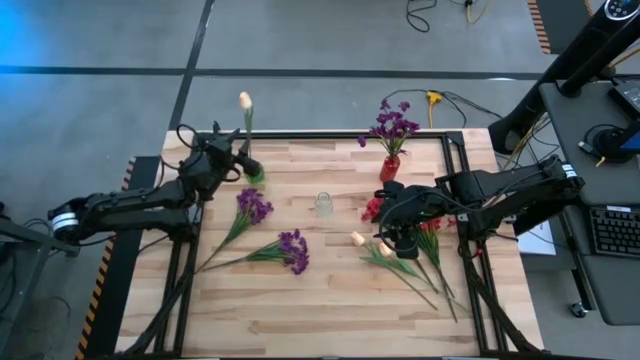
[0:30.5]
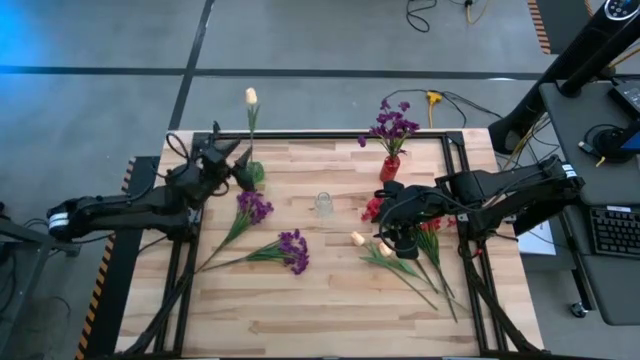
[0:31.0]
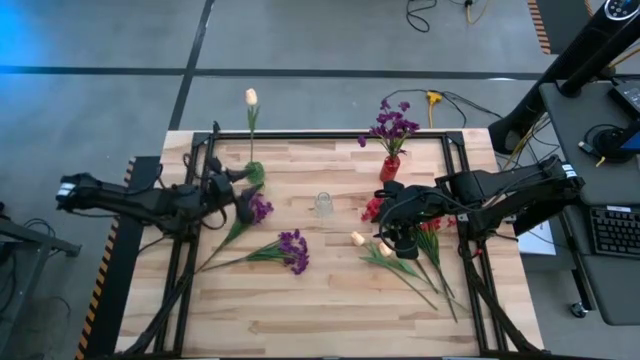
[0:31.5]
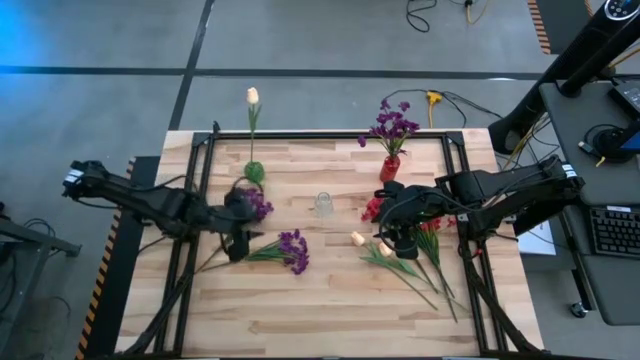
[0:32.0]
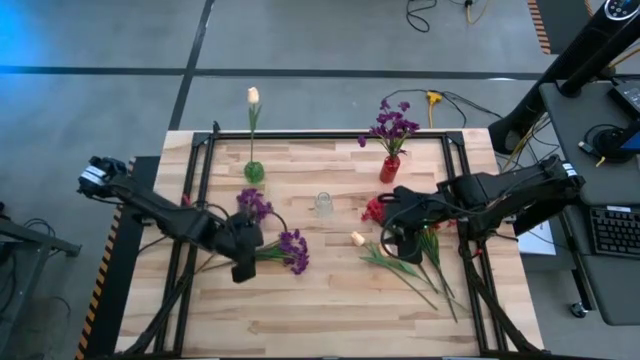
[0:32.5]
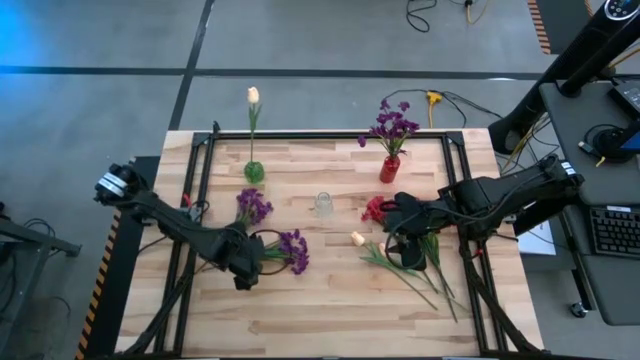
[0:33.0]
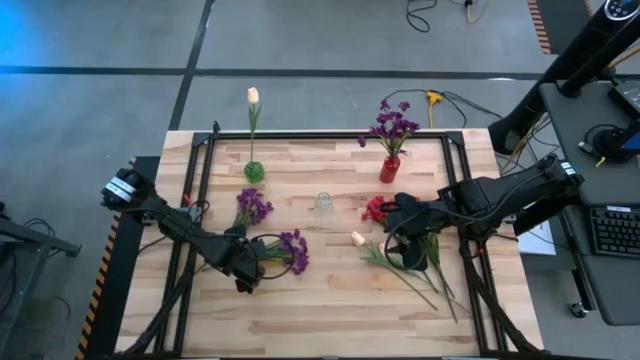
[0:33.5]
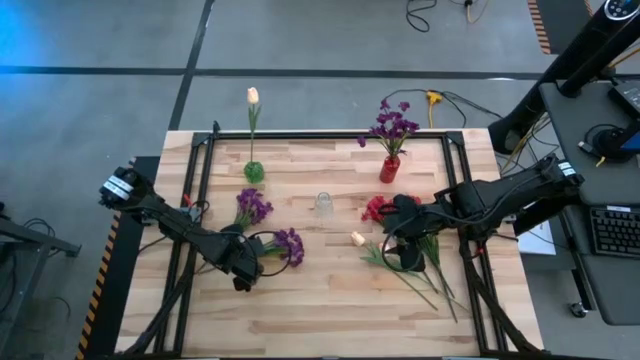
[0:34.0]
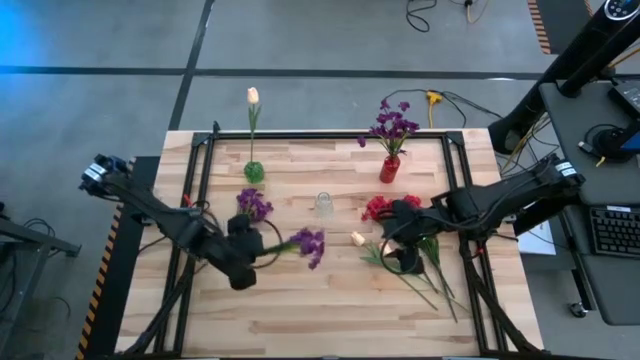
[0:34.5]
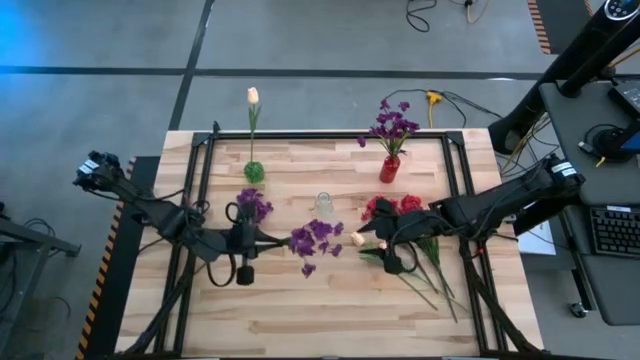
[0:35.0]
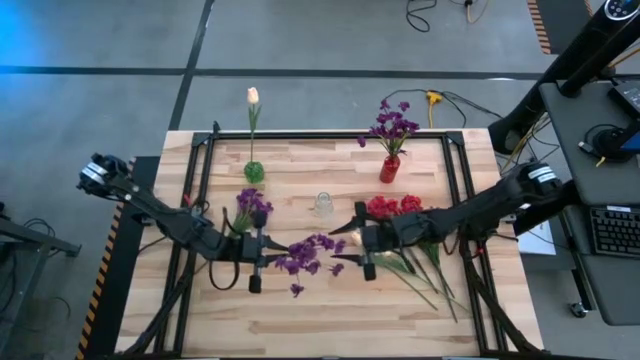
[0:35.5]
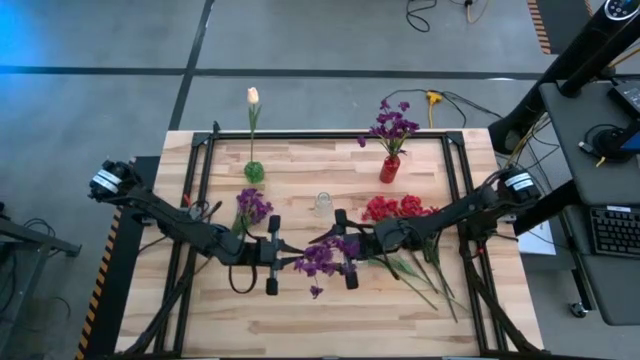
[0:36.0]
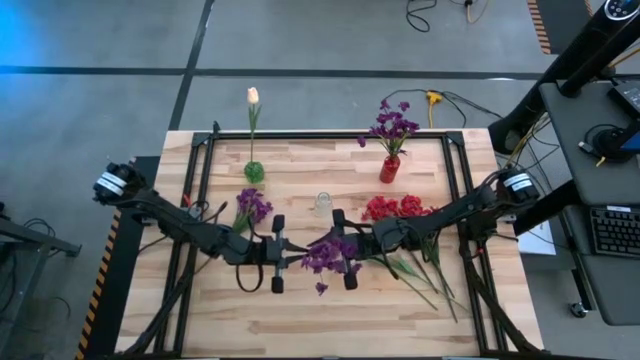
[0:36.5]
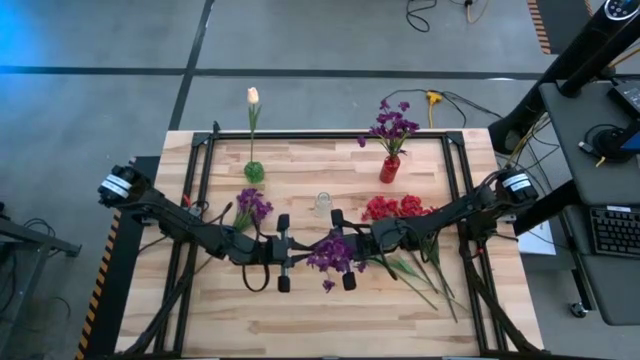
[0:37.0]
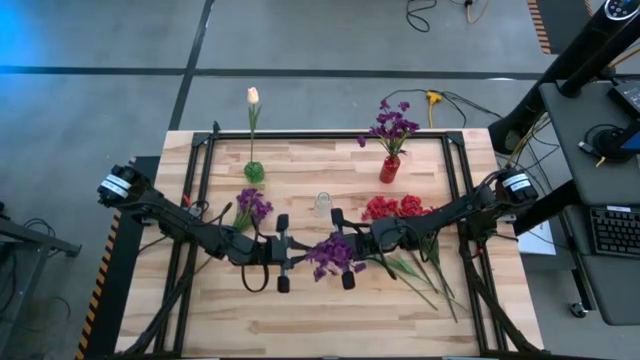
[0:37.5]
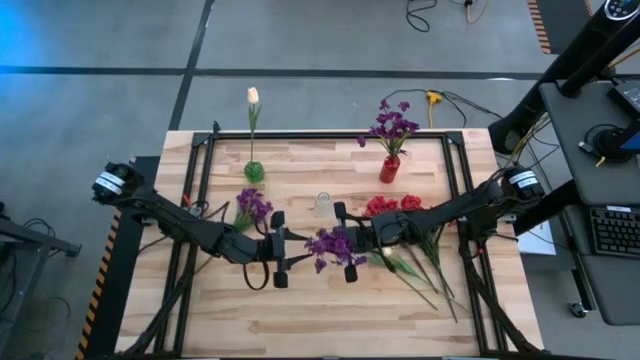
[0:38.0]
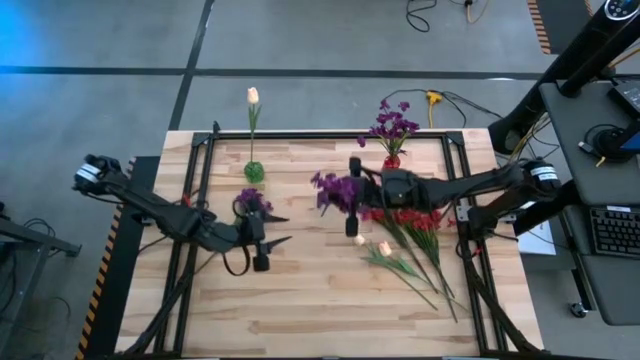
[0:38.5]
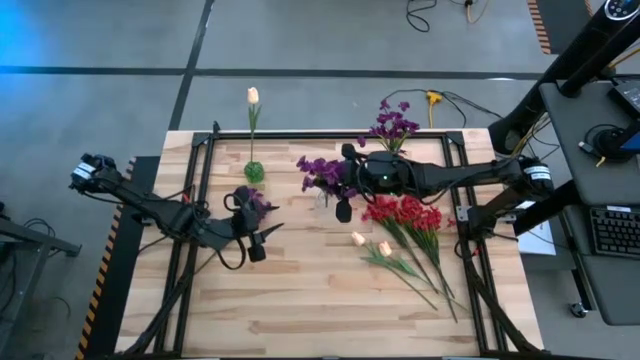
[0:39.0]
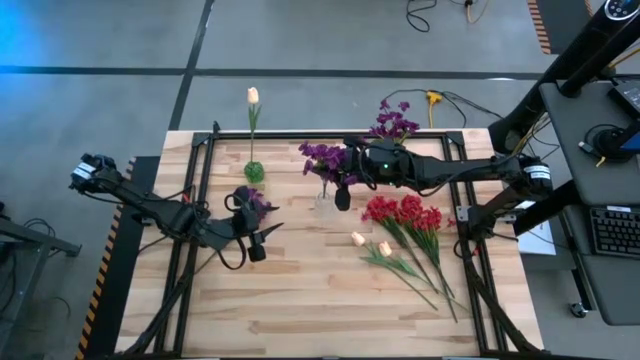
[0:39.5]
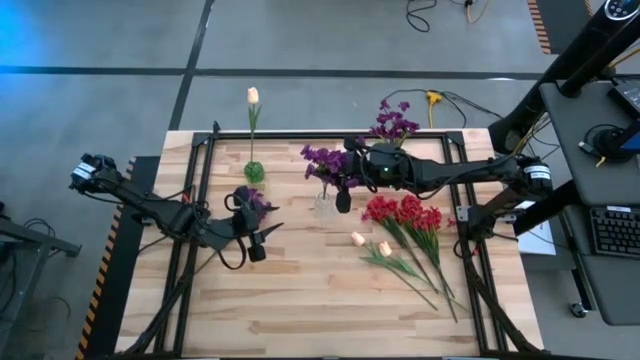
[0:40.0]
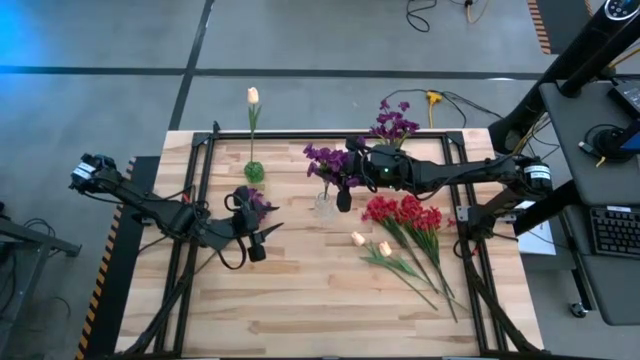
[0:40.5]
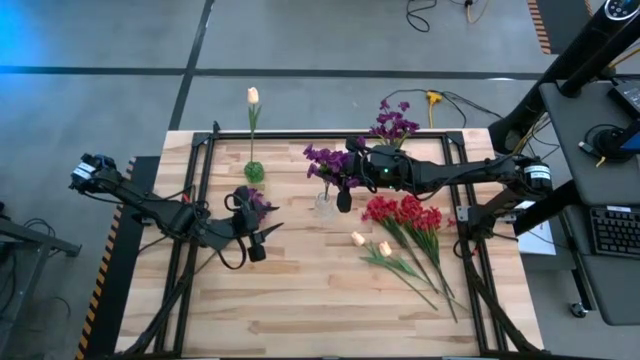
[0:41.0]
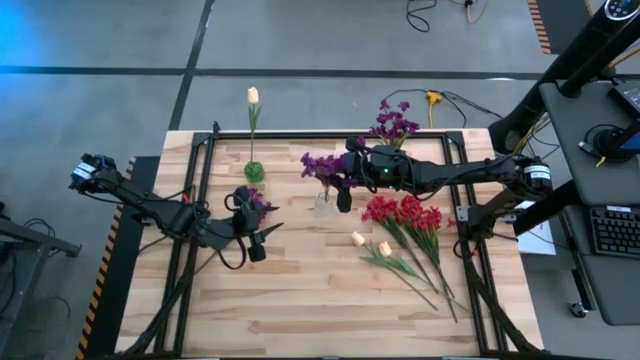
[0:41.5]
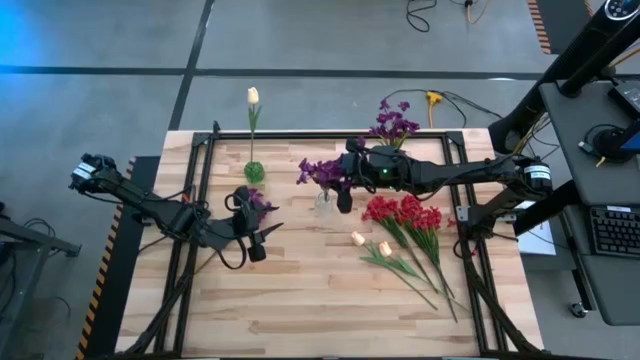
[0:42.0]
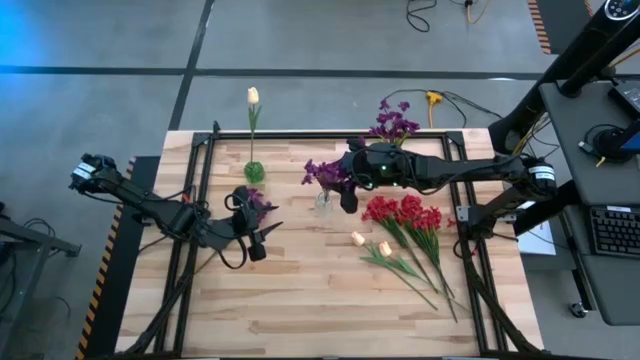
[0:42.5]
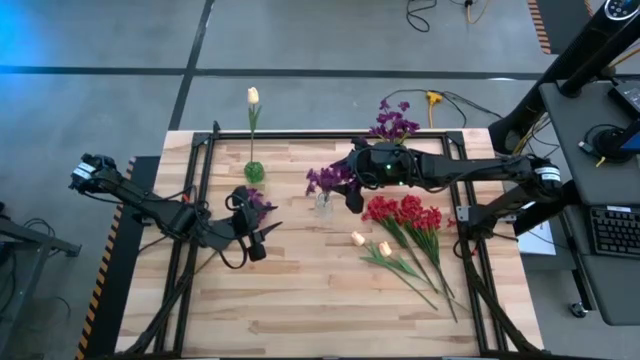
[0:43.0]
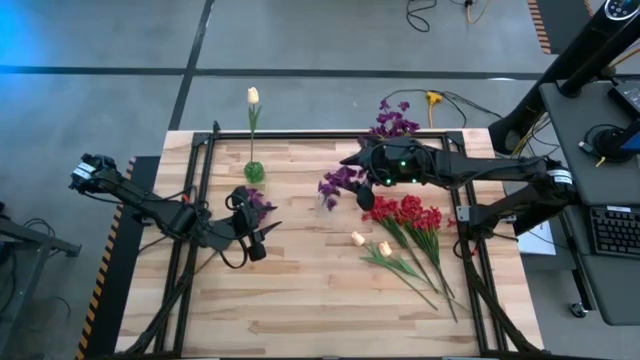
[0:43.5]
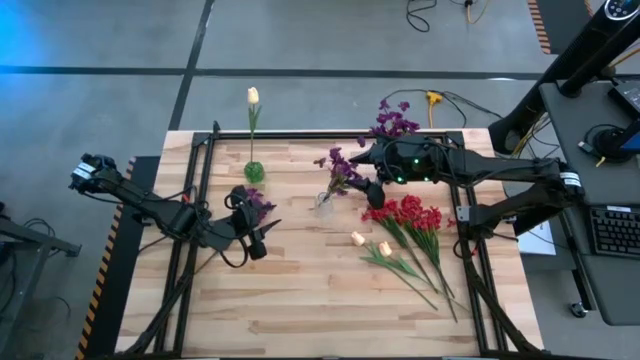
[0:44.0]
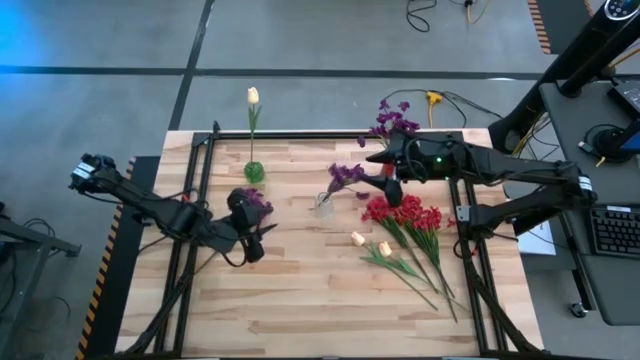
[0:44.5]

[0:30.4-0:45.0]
Task: Sort flowers into vase by color
Put the bottom violet flowers into the red vase
